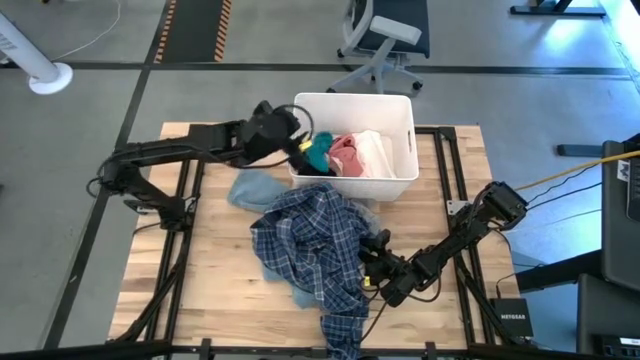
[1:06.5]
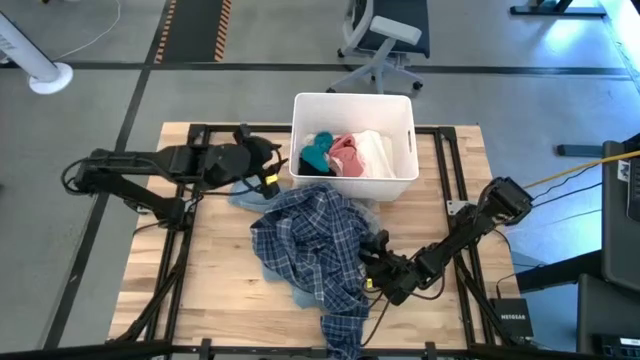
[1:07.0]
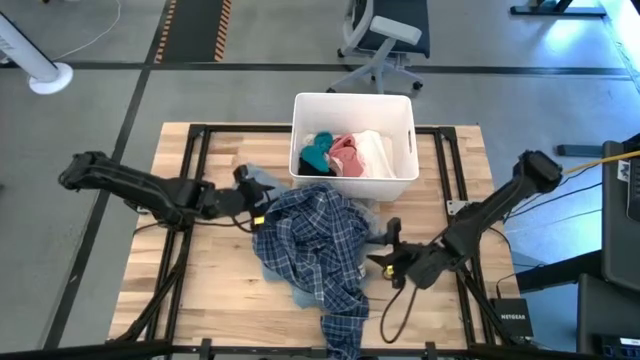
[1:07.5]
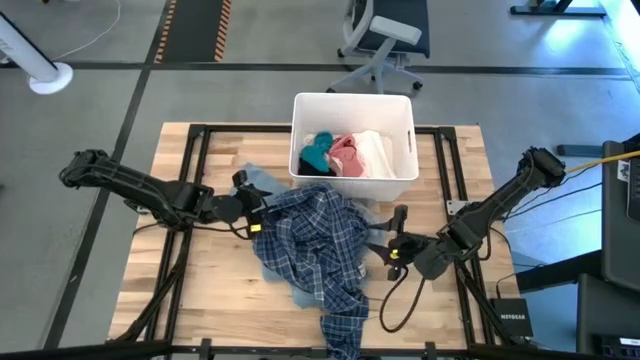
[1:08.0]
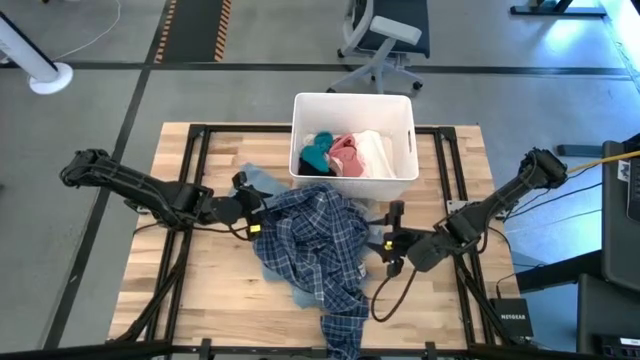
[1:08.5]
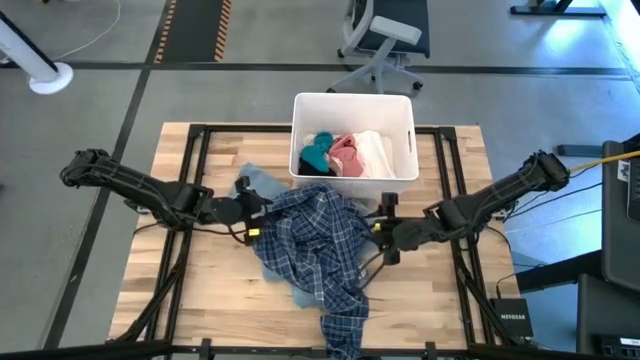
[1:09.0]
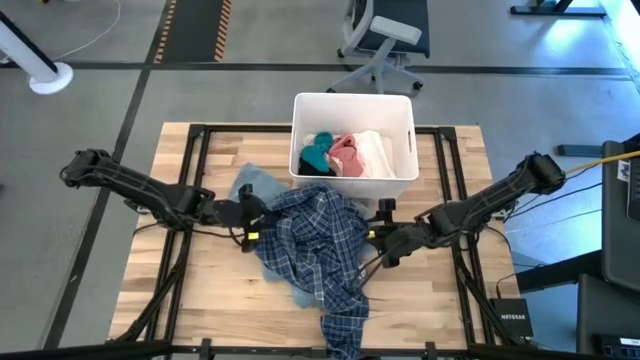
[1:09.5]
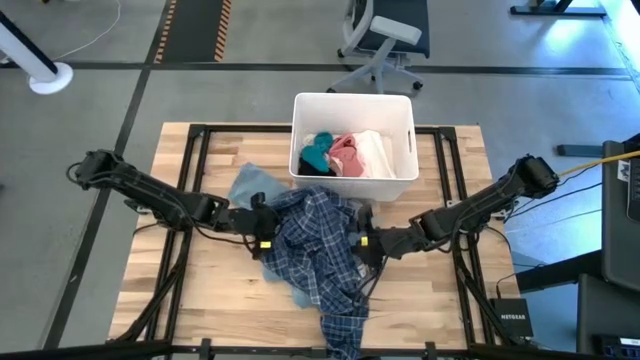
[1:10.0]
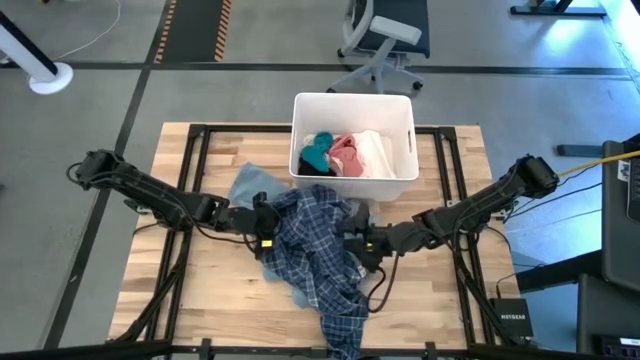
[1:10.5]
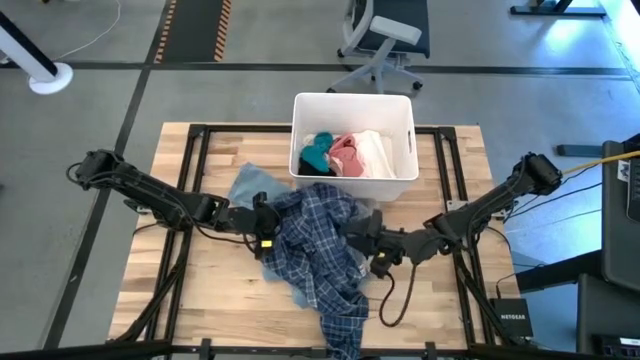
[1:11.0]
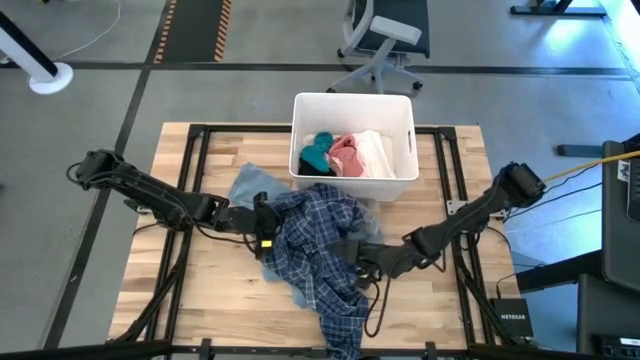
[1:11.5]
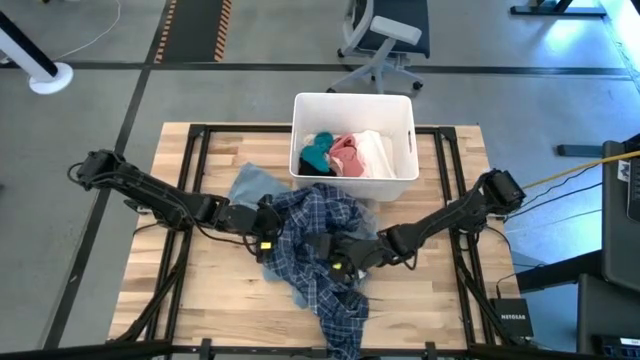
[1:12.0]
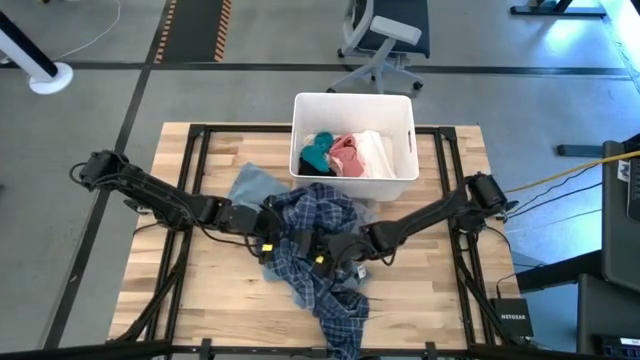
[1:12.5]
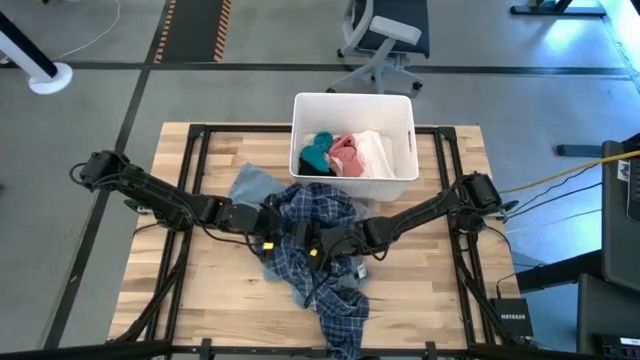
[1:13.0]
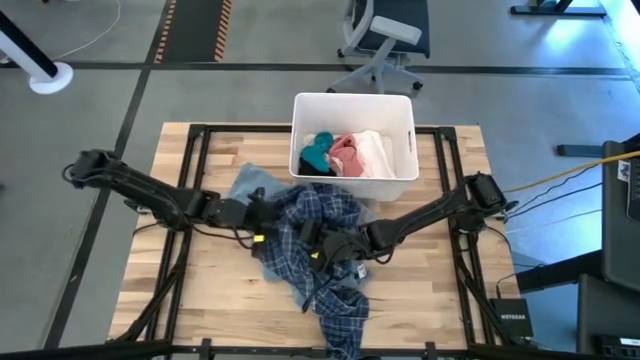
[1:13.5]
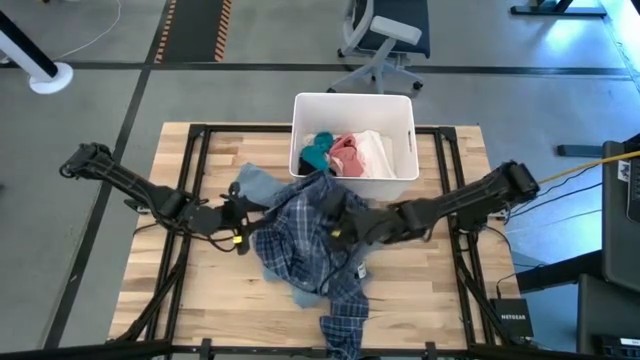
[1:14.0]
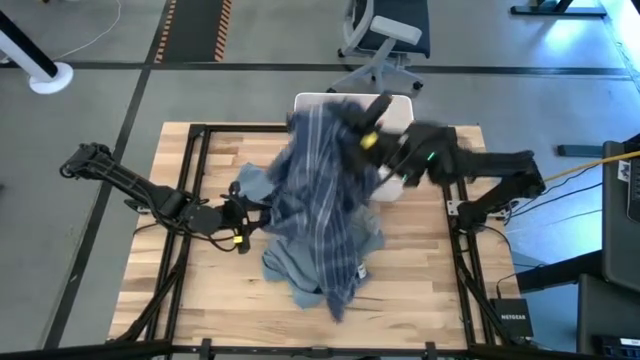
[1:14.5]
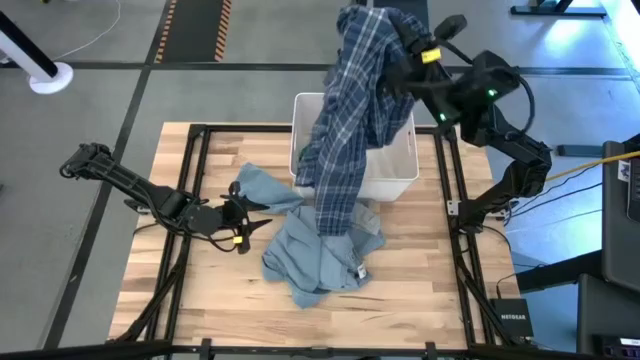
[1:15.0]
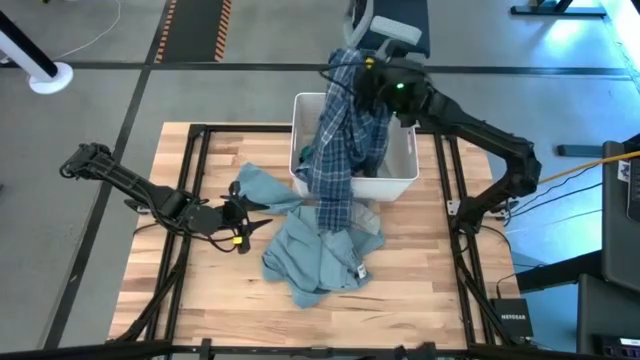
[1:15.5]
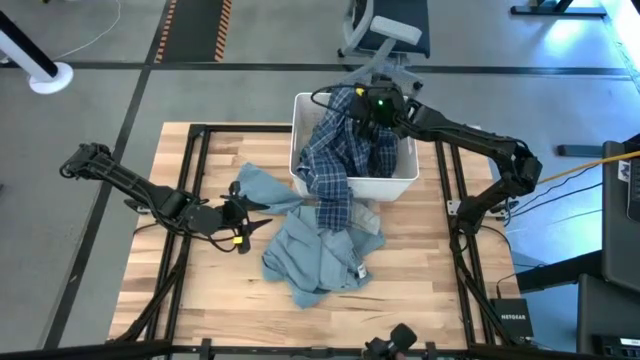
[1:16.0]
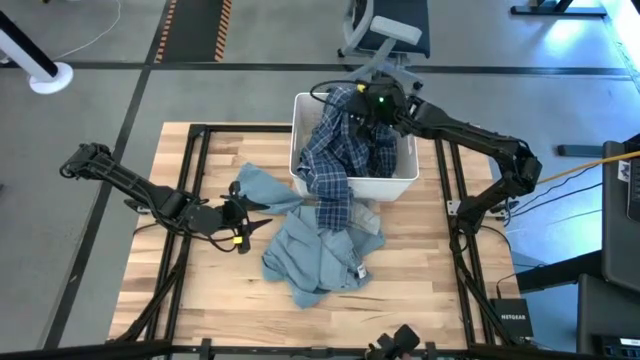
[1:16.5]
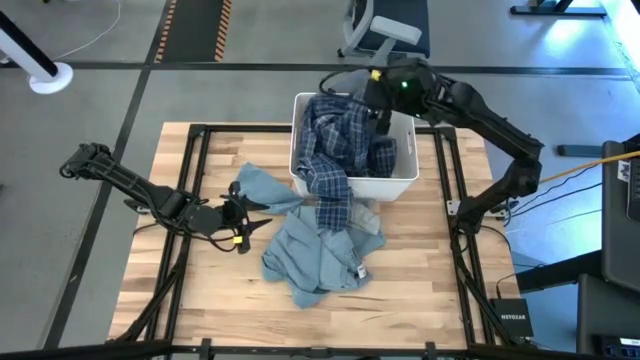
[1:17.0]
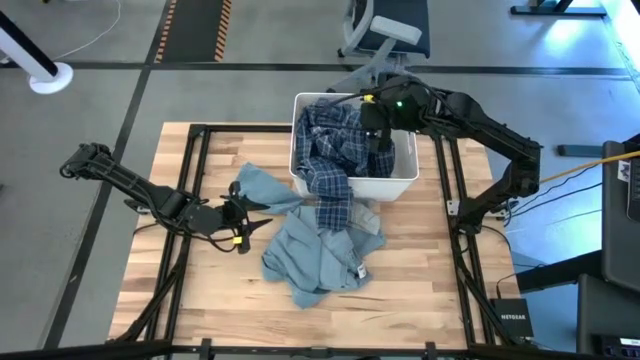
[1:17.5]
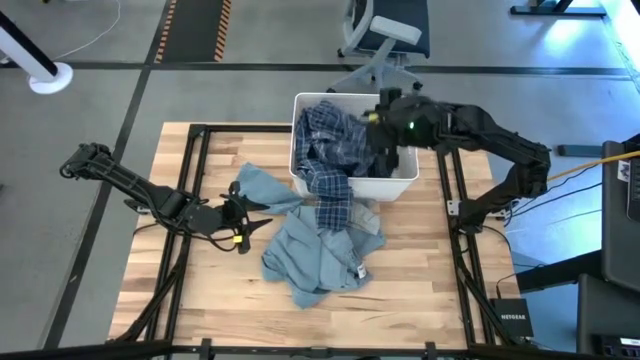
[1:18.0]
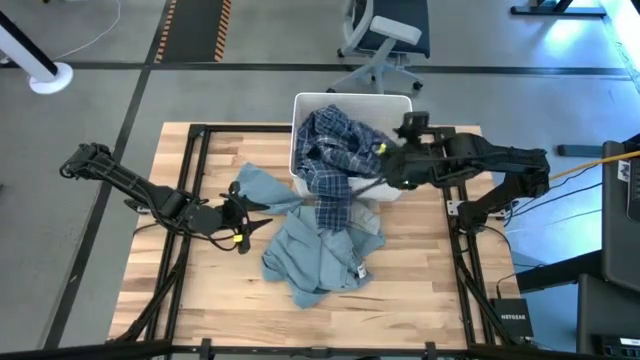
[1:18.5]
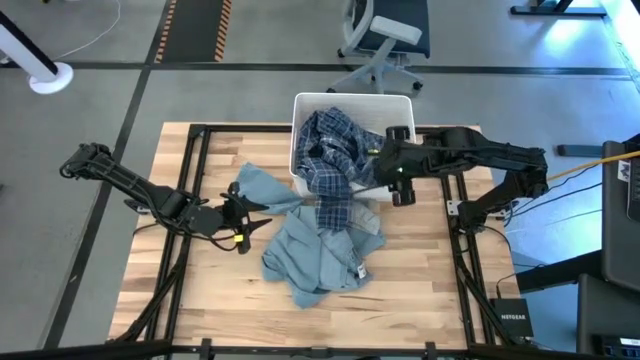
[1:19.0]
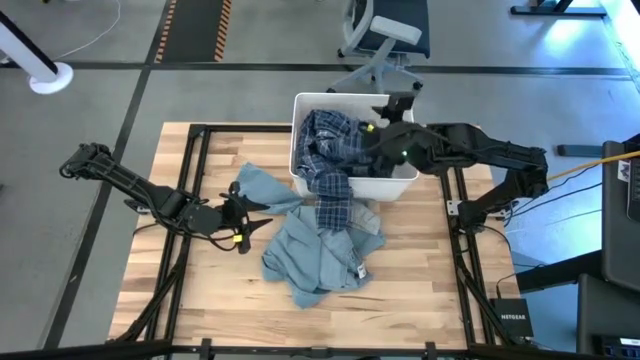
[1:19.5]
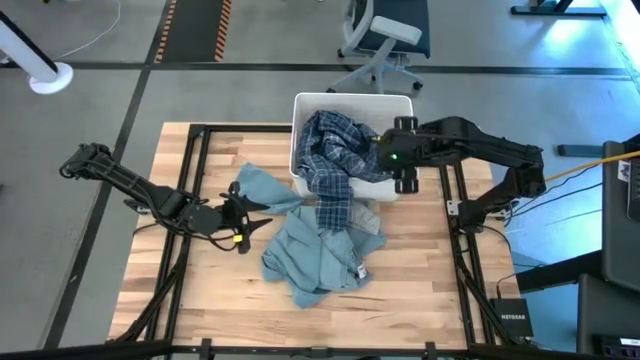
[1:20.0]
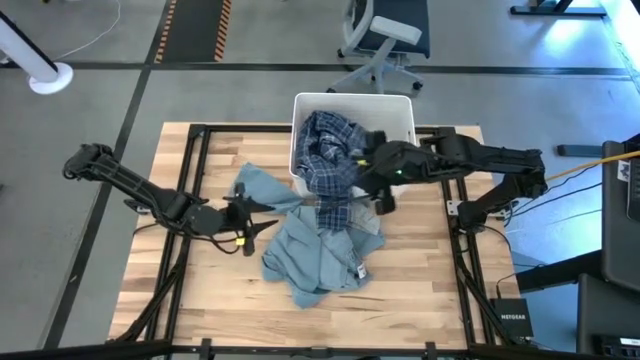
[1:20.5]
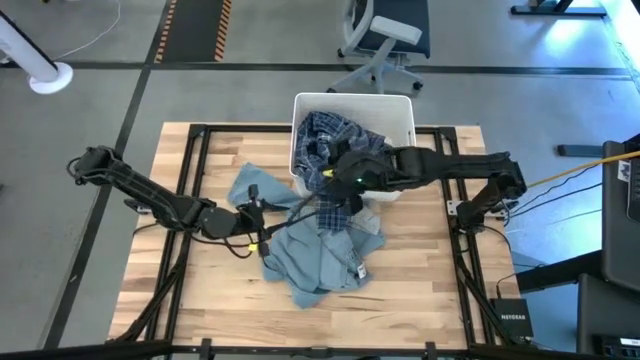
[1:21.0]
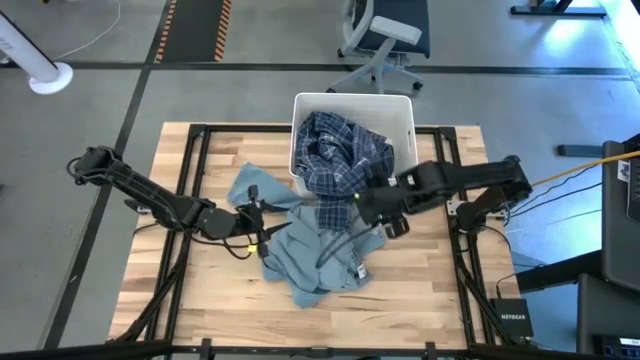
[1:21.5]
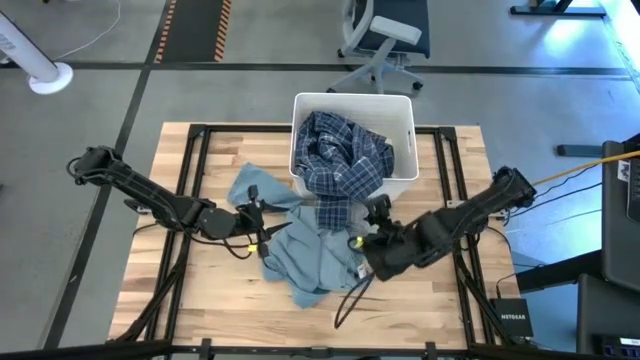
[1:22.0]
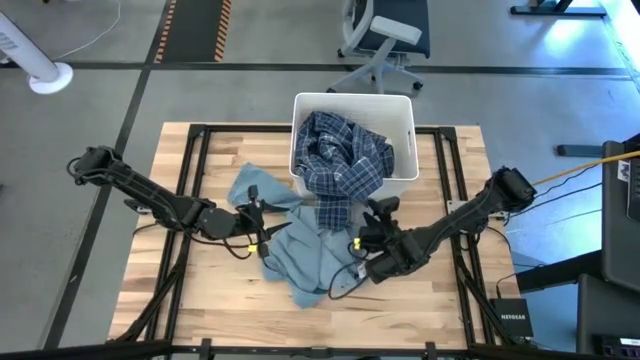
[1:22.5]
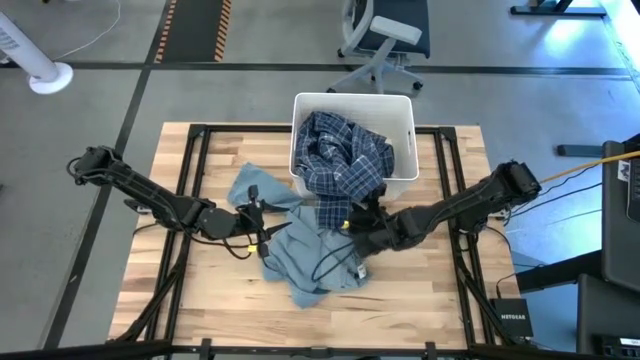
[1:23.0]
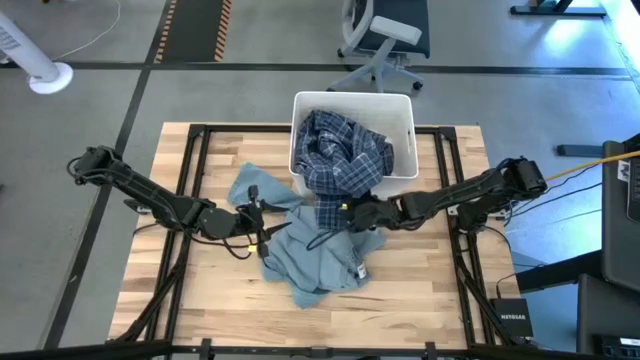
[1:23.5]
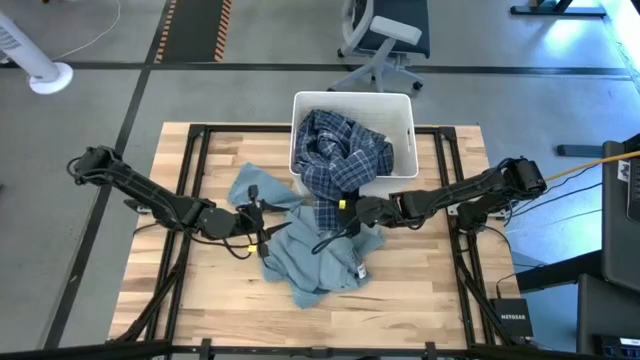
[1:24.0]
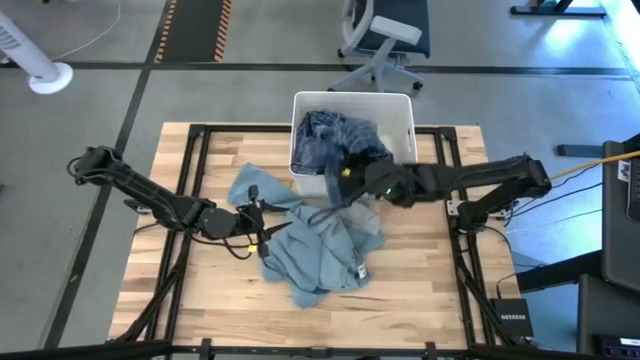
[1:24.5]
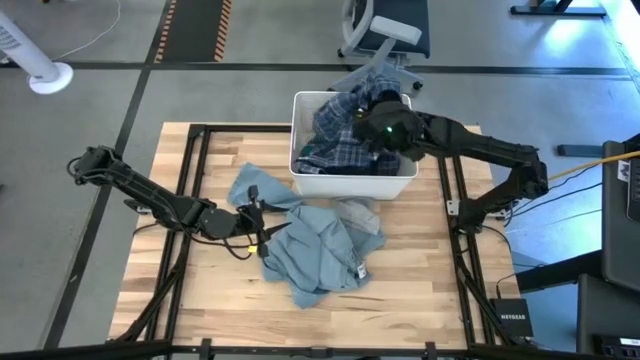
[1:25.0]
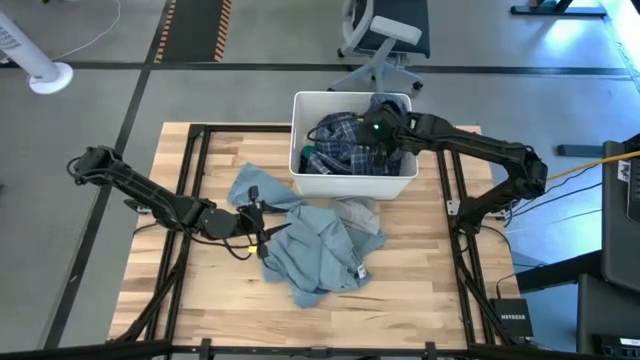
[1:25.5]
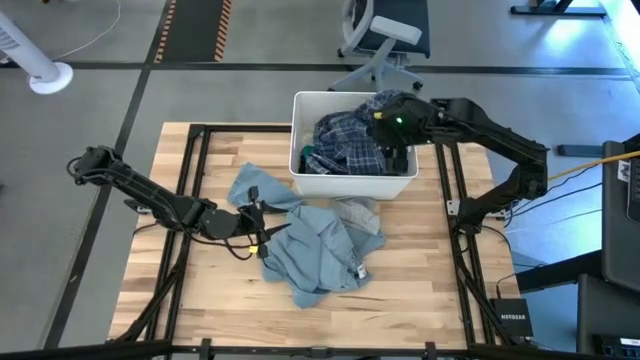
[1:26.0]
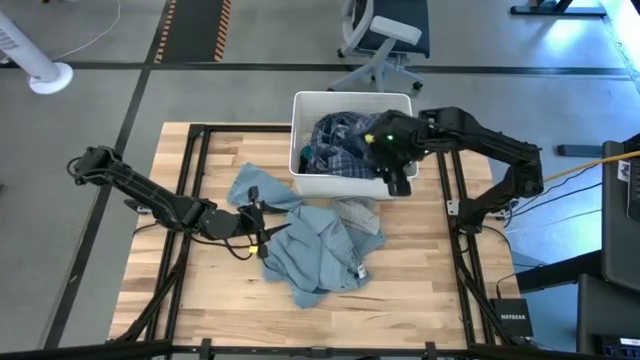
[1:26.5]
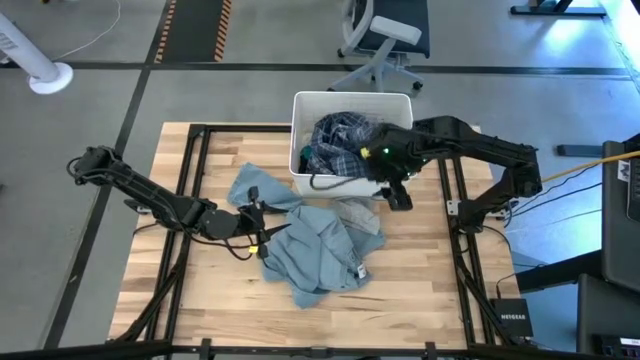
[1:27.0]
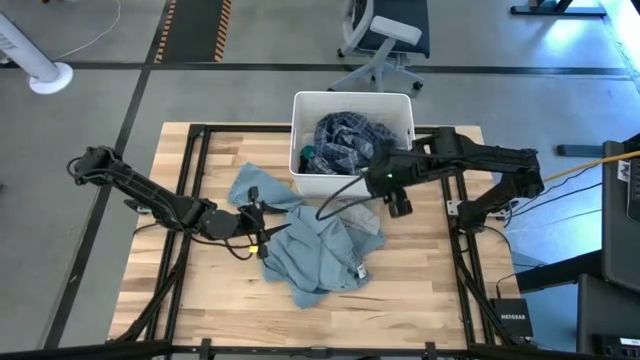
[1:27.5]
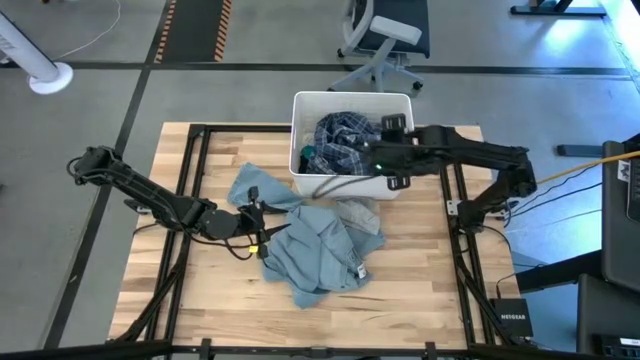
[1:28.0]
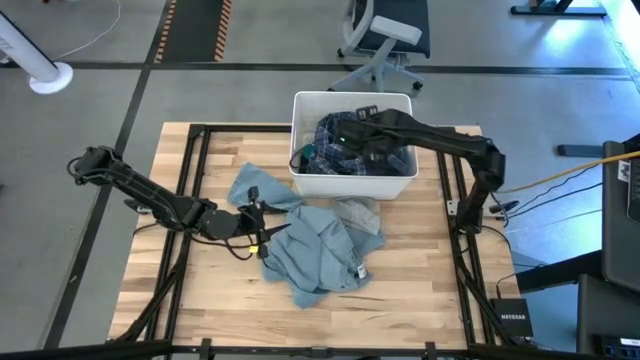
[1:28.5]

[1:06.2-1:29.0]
Task: Sort clothes
Put the blue long sleeve into the white laundry bin
